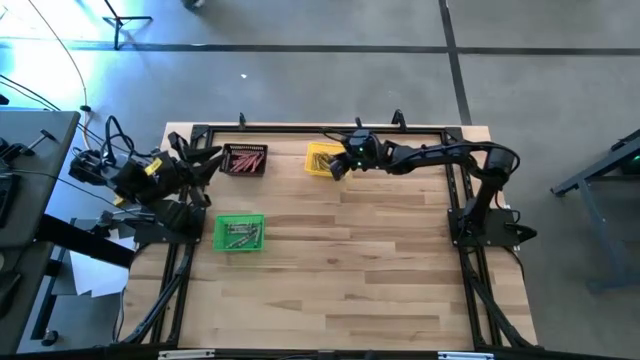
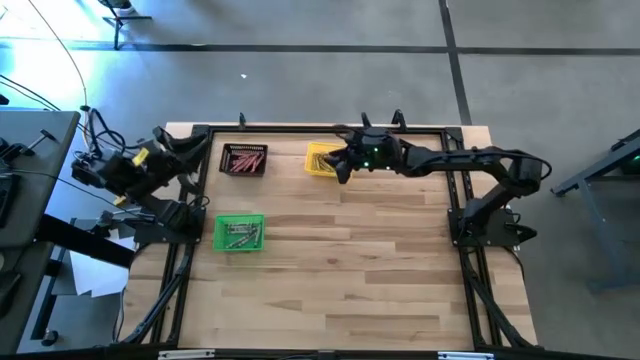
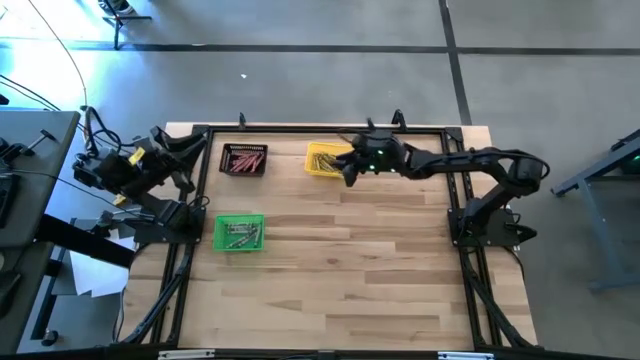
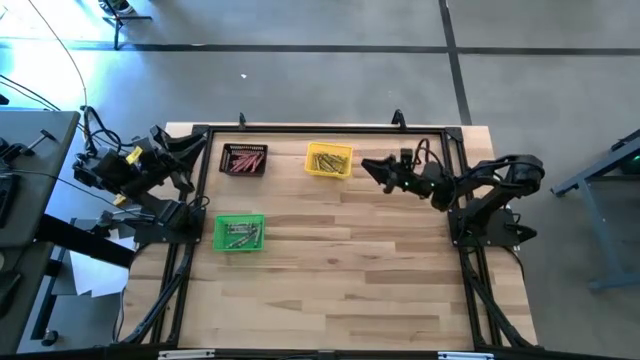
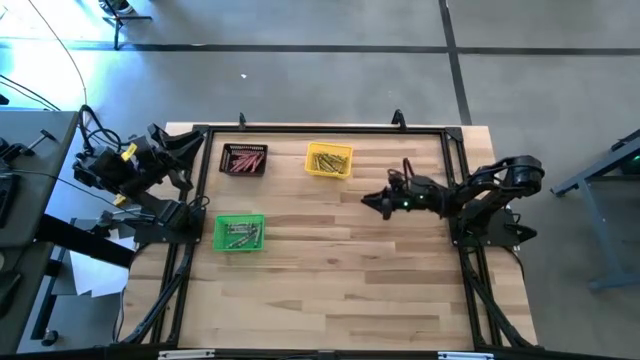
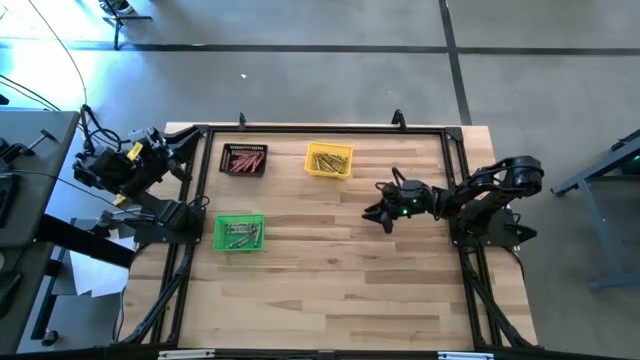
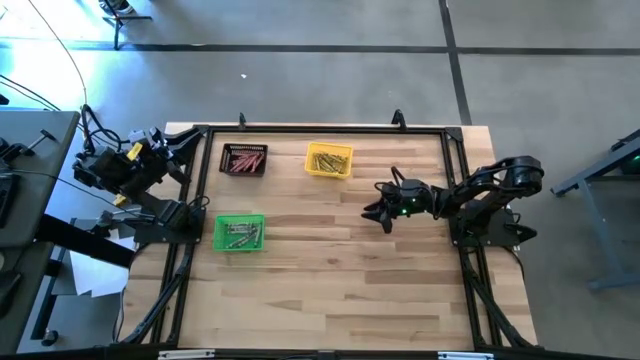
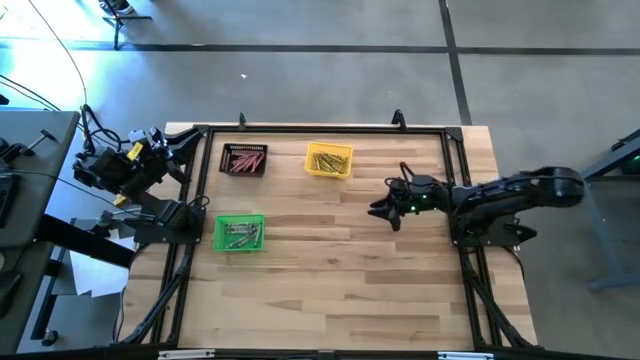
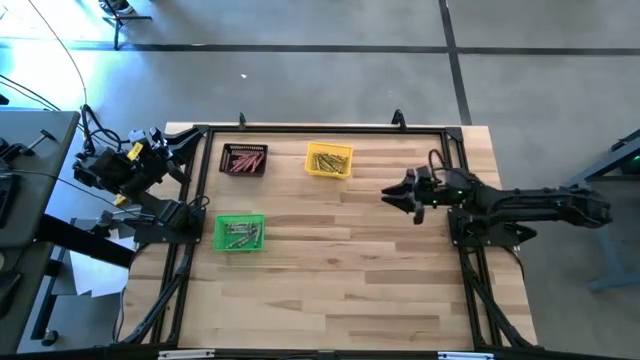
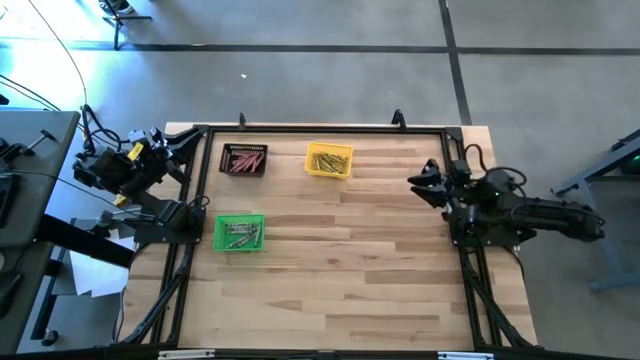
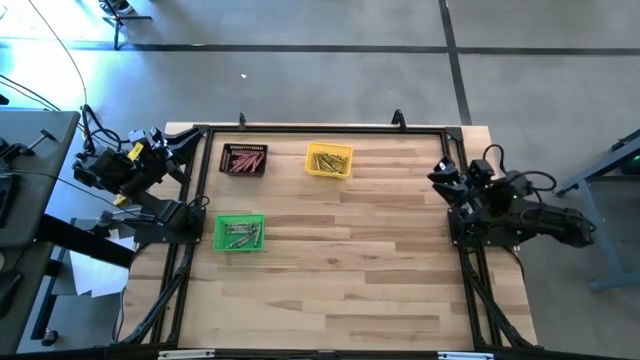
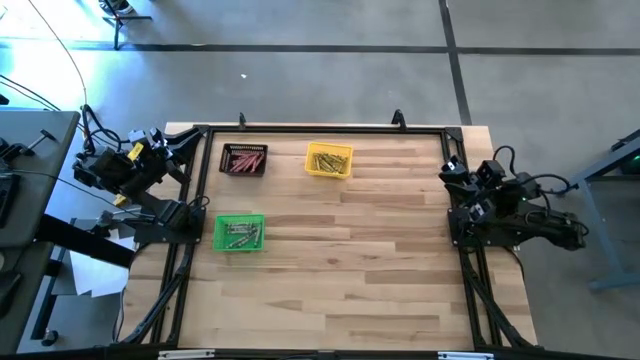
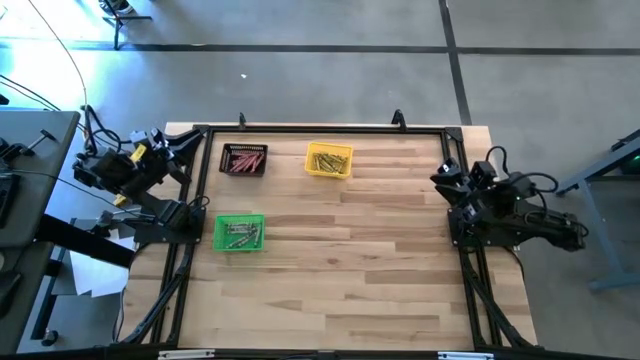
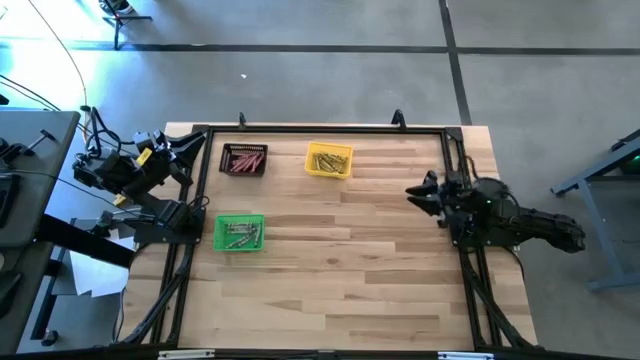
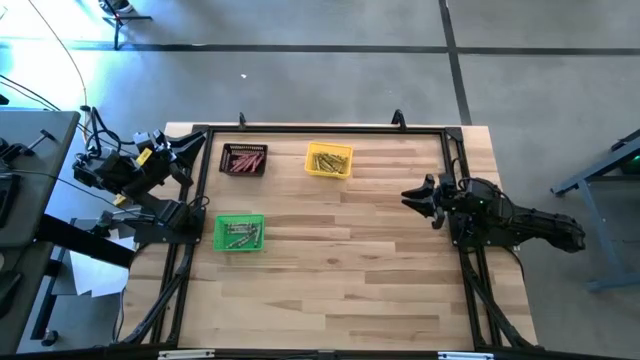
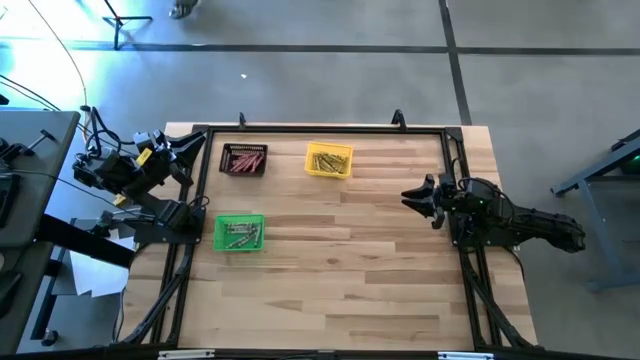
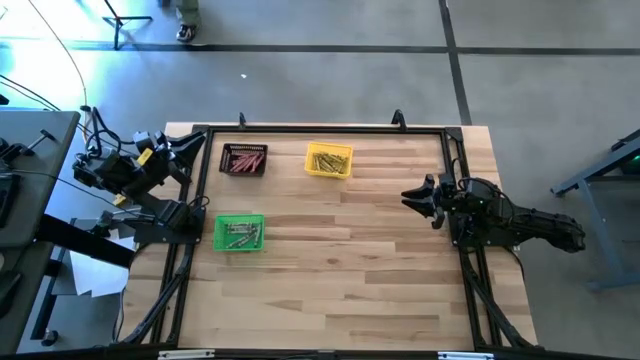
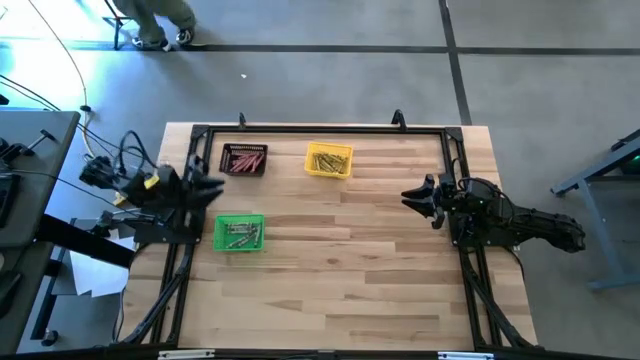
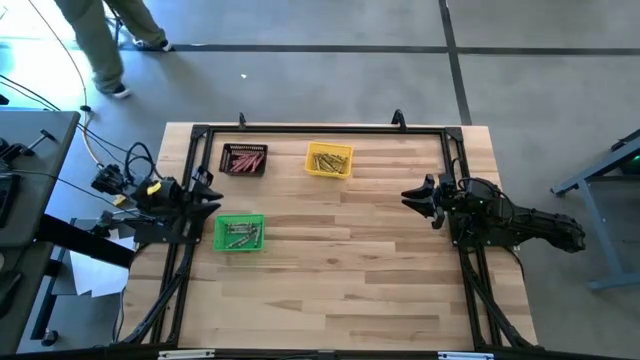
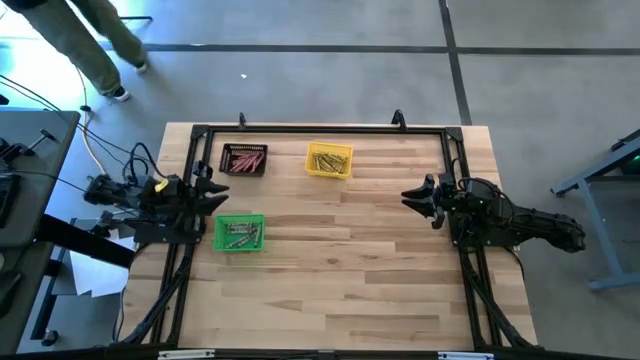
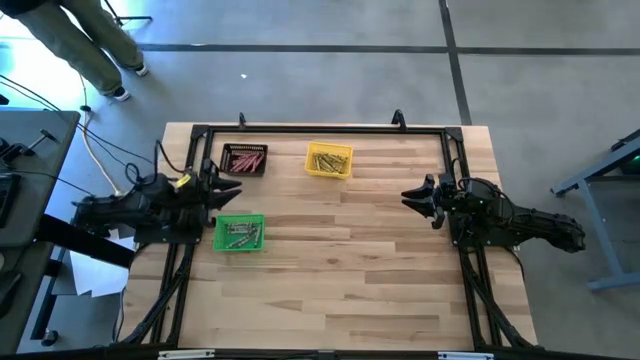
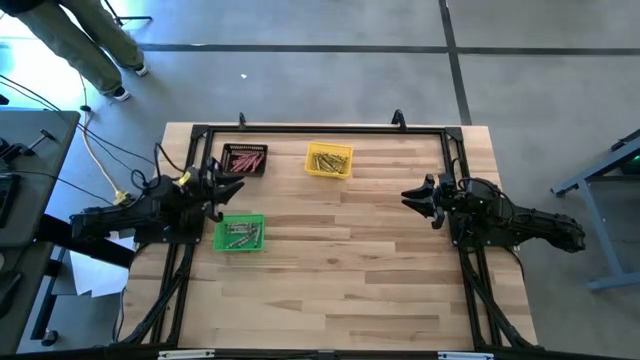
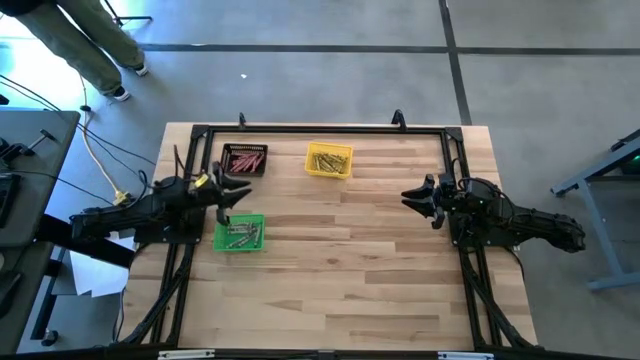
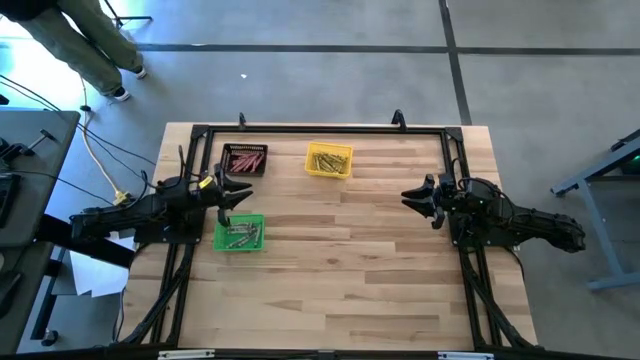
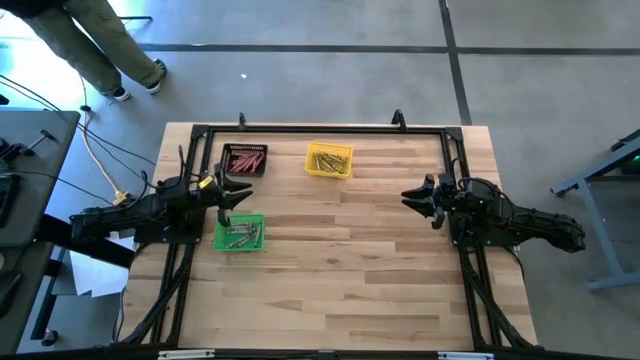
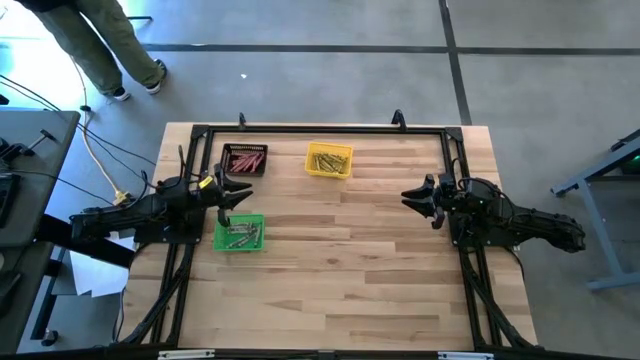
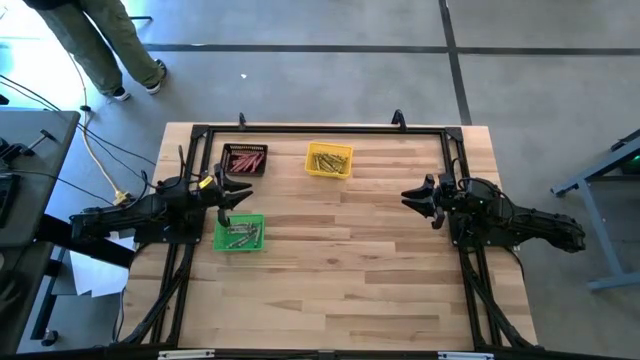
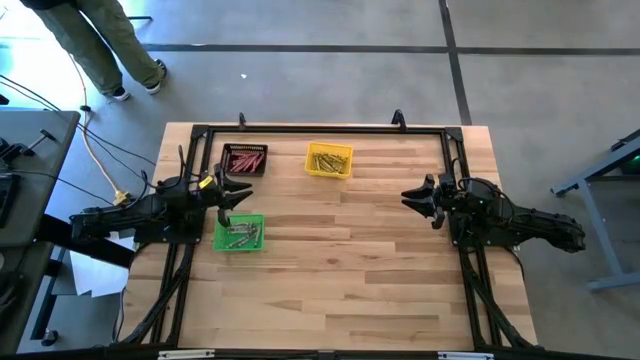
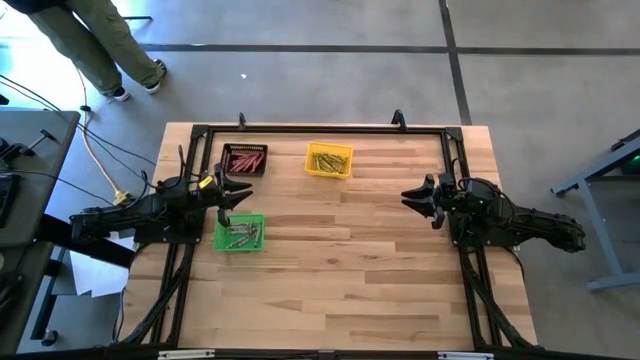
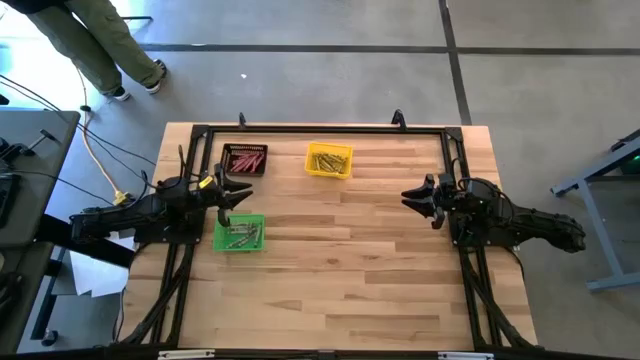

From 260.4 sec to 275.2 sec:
Task: Sort crayons
Return to Home Position

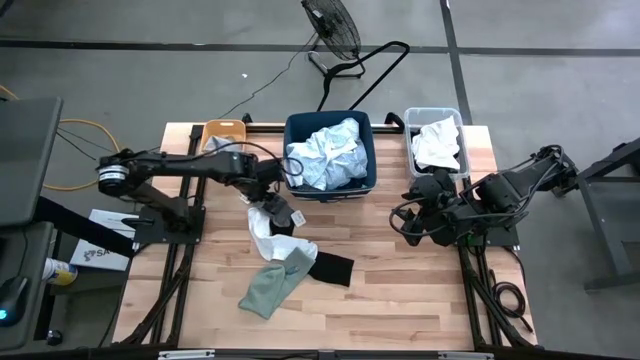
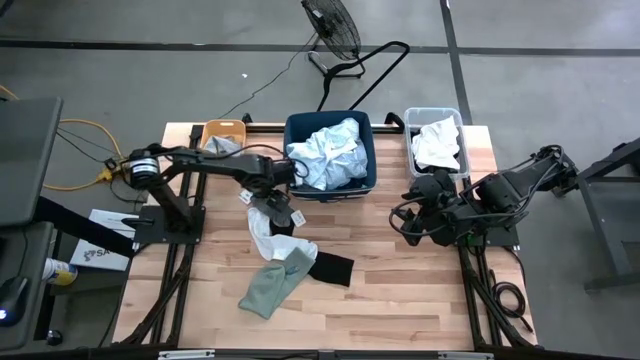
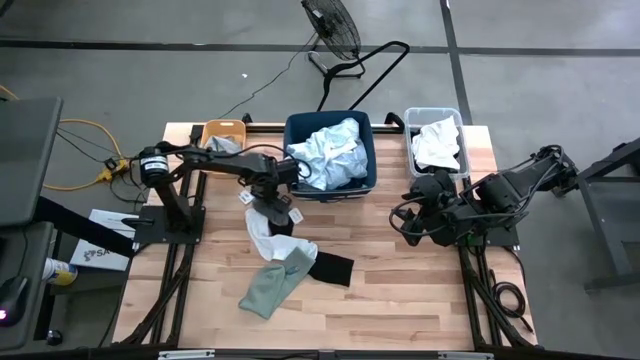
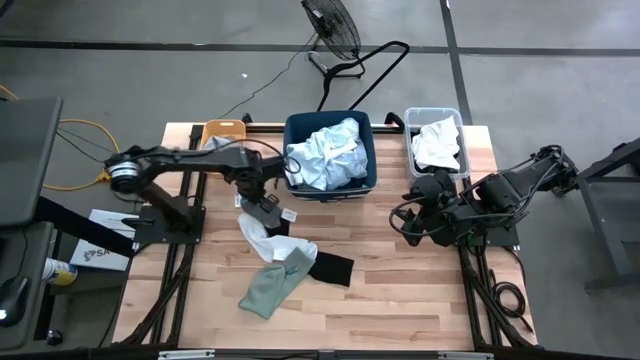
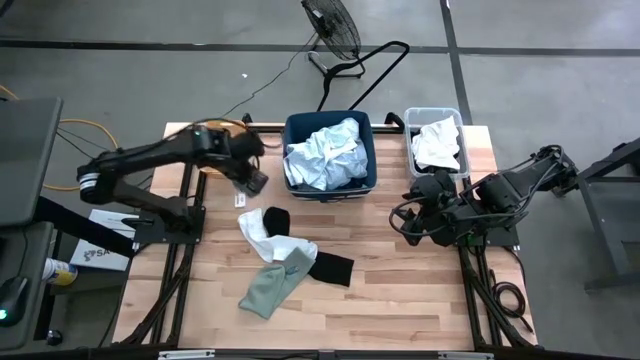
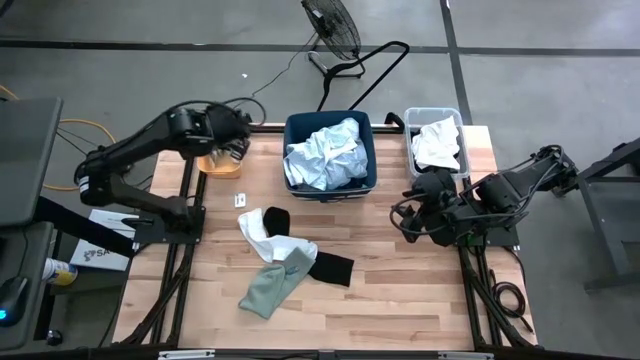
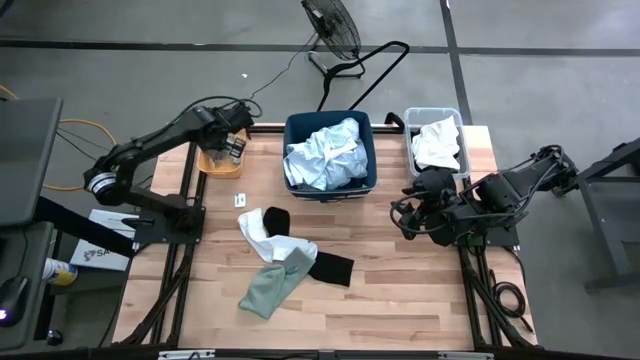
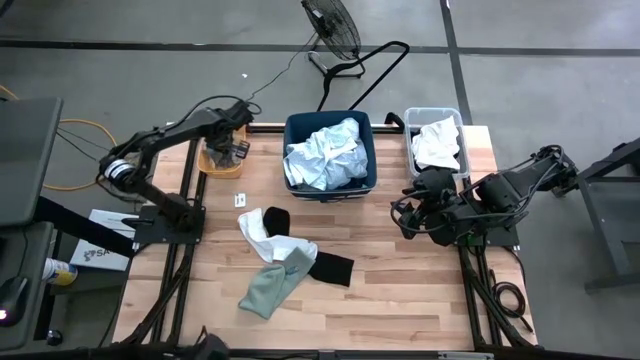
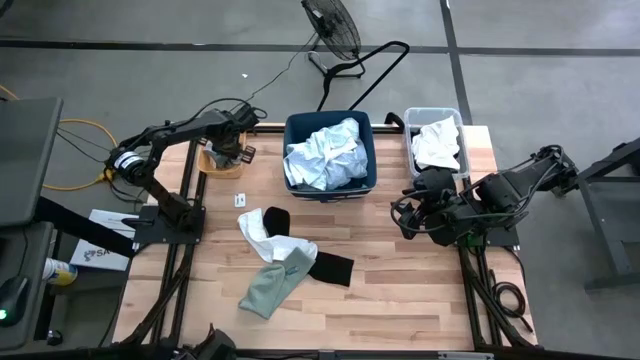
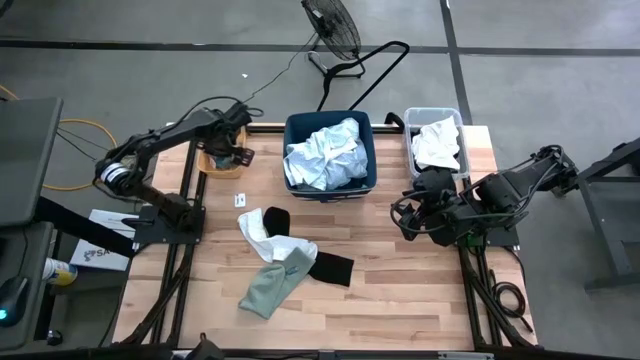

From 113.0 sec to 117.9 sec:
Task: Pick & Place Cloths
Put the gray sock into the yellow bin

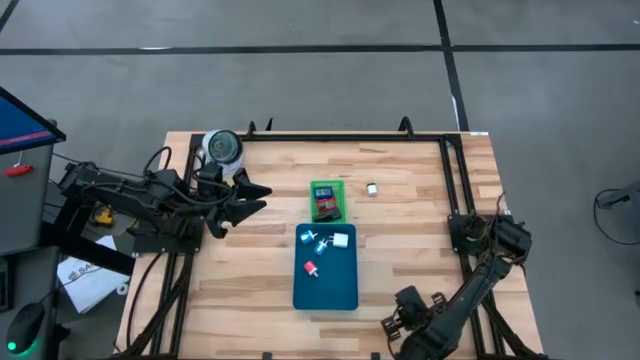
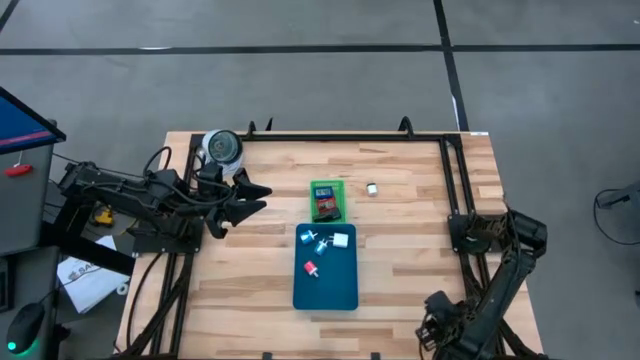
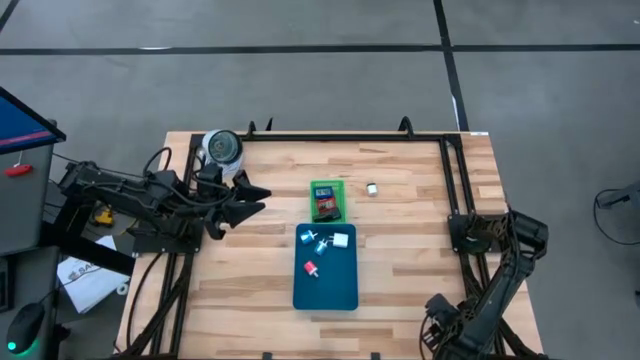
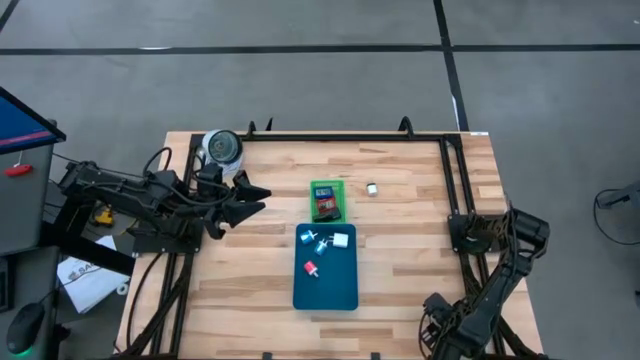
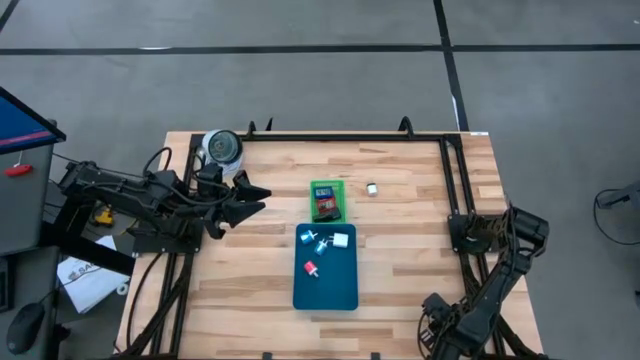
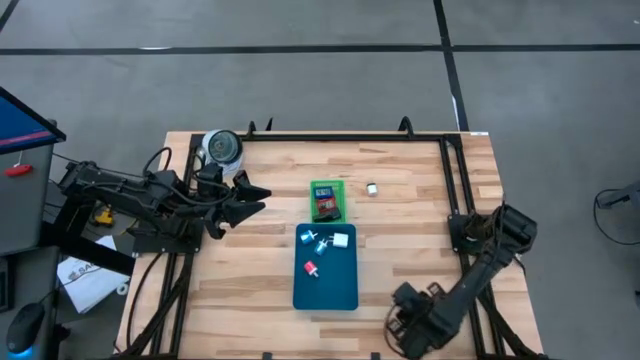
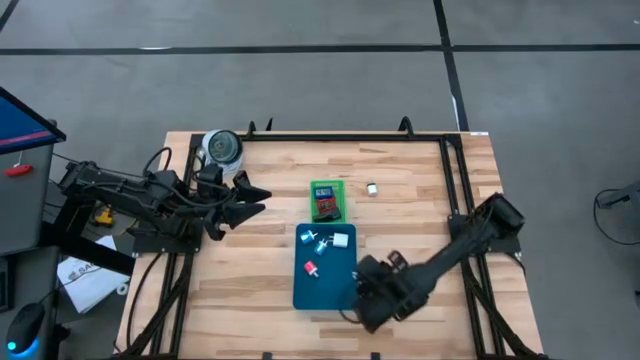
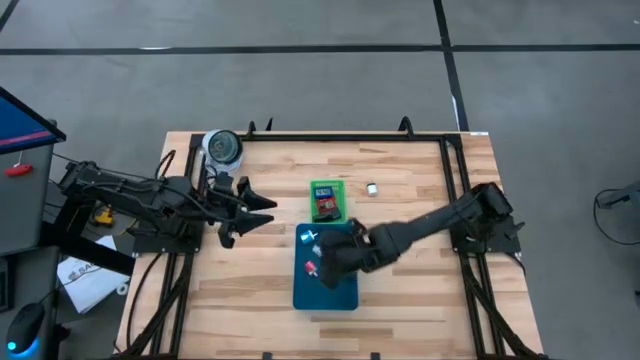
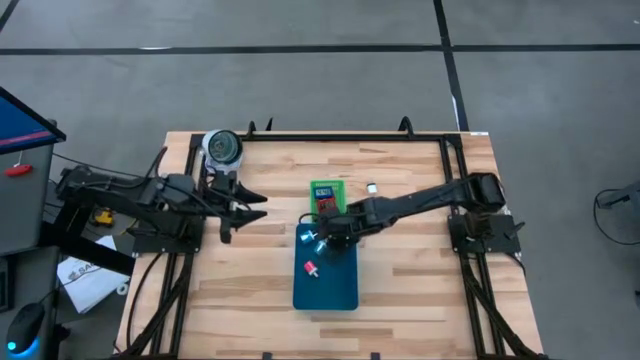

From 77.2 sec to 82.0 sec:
Task: Pick & Place Office items
Put the bottom white charger adapter into the blue bin
